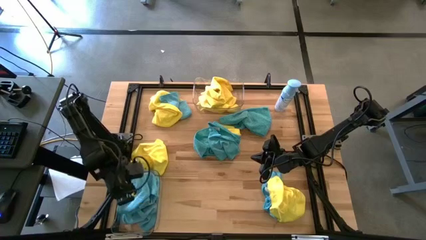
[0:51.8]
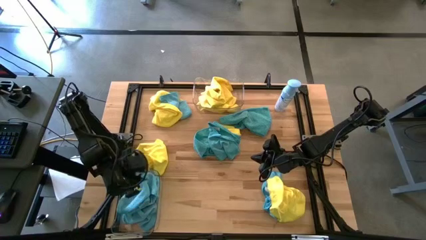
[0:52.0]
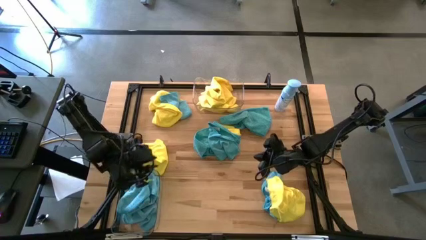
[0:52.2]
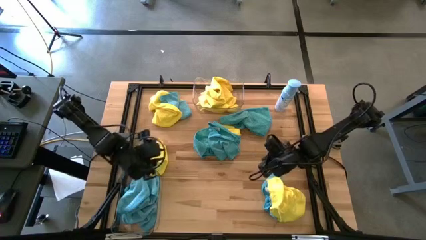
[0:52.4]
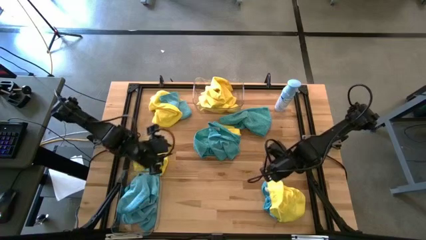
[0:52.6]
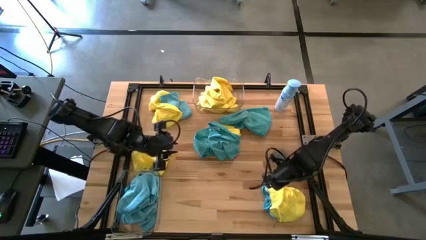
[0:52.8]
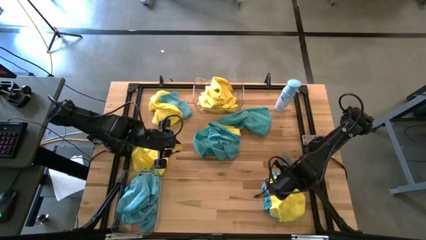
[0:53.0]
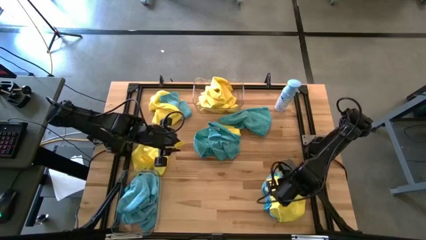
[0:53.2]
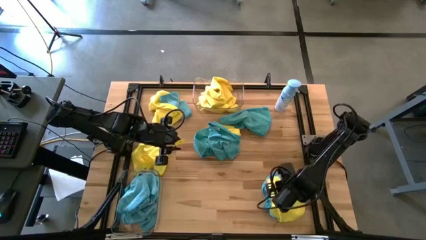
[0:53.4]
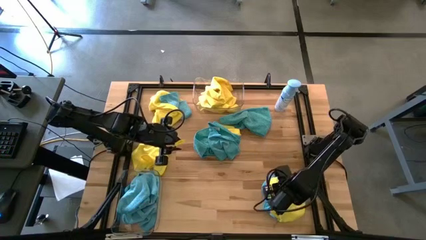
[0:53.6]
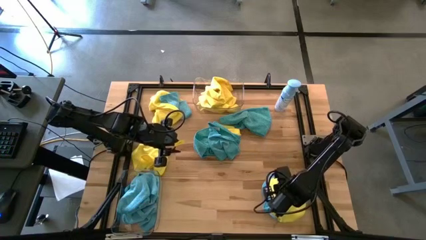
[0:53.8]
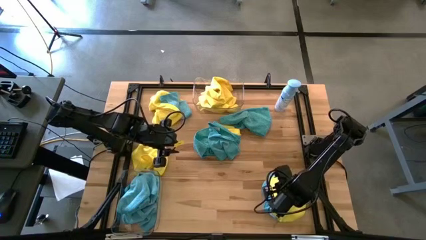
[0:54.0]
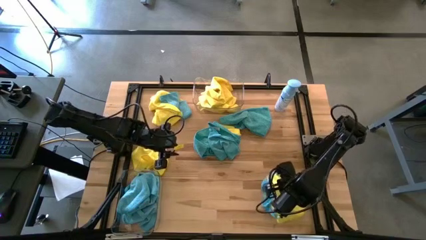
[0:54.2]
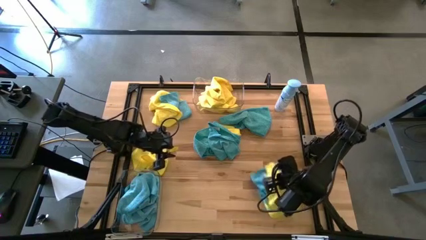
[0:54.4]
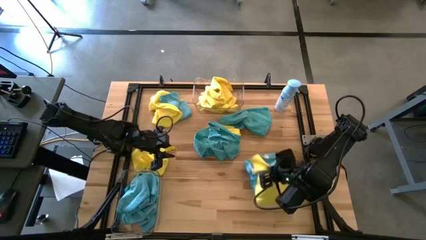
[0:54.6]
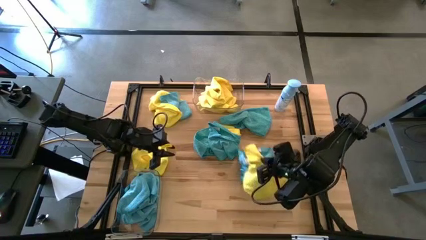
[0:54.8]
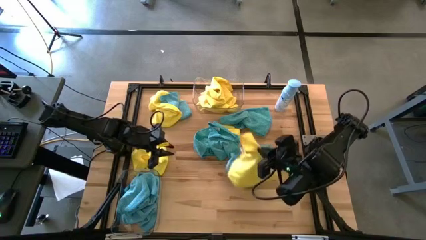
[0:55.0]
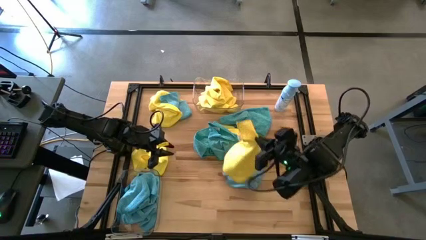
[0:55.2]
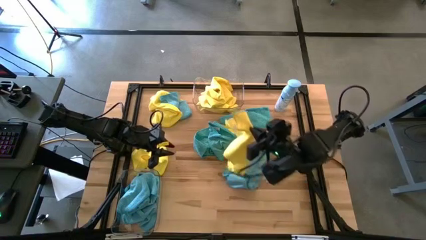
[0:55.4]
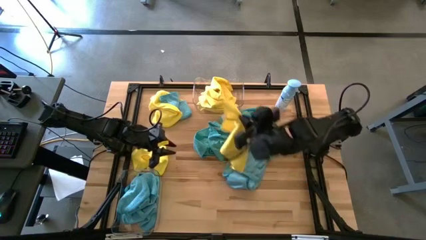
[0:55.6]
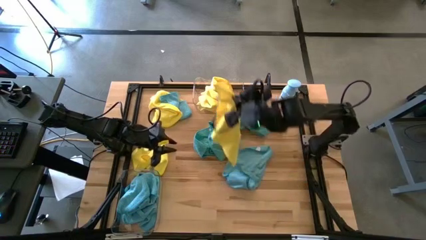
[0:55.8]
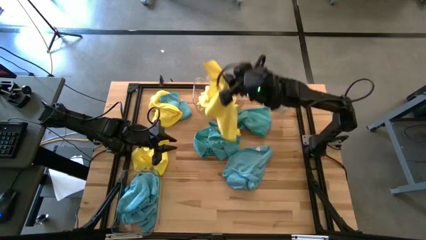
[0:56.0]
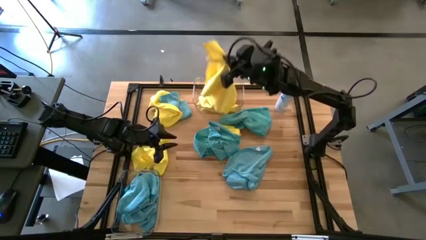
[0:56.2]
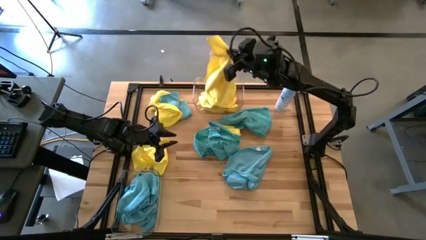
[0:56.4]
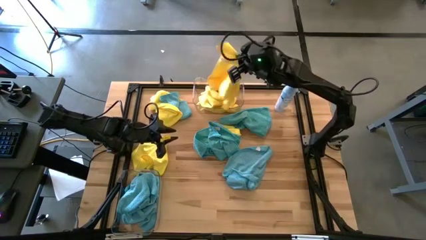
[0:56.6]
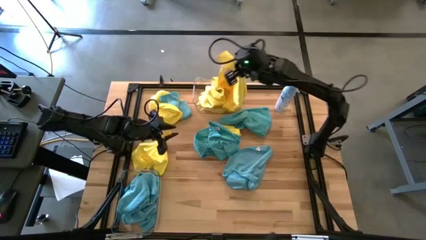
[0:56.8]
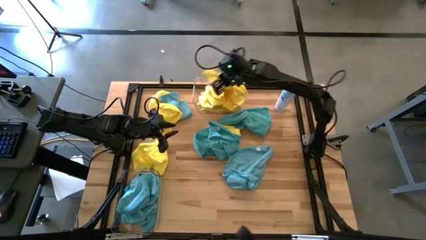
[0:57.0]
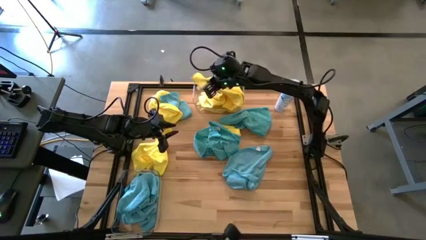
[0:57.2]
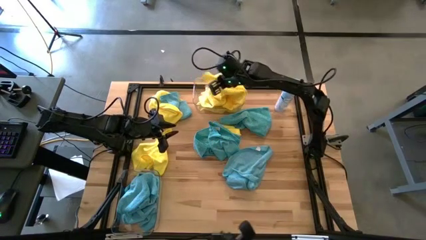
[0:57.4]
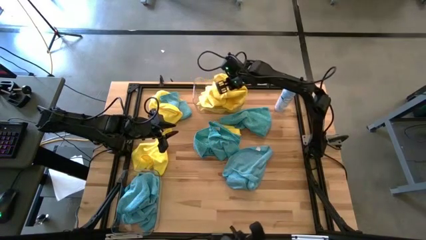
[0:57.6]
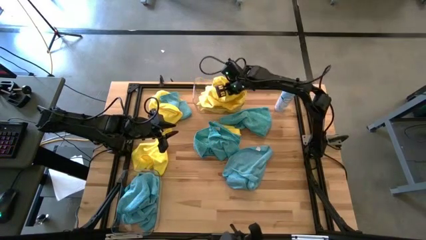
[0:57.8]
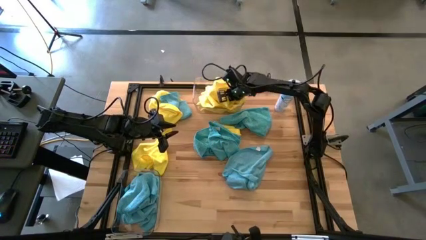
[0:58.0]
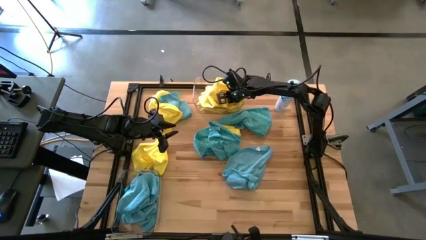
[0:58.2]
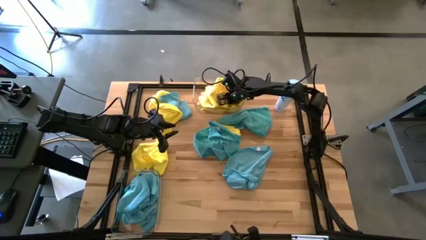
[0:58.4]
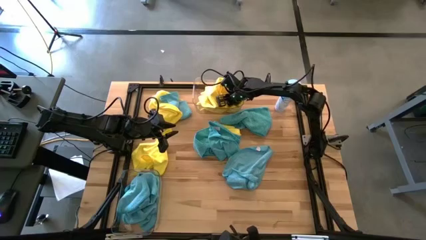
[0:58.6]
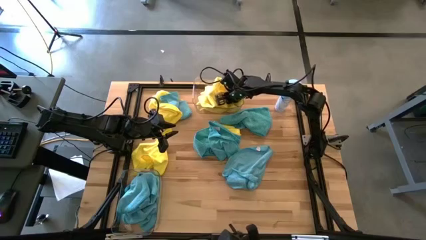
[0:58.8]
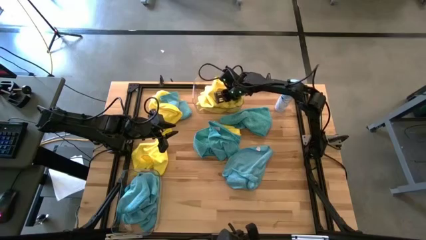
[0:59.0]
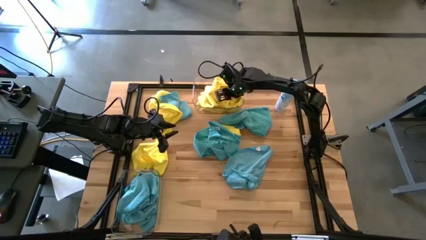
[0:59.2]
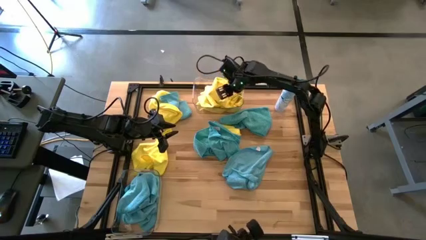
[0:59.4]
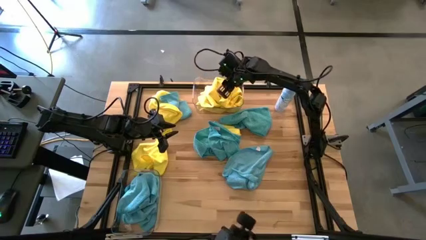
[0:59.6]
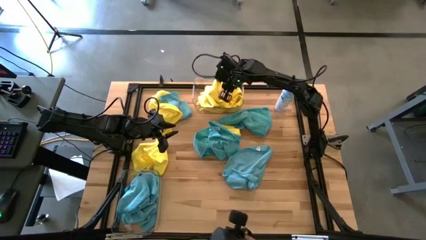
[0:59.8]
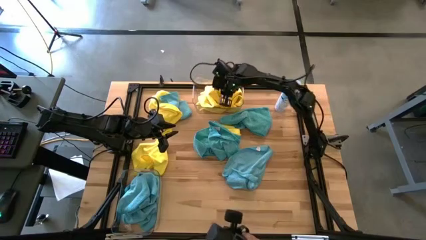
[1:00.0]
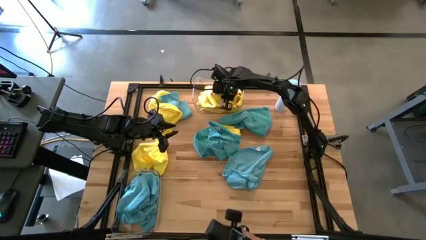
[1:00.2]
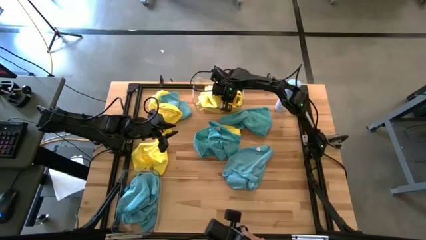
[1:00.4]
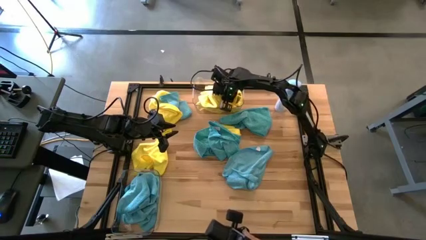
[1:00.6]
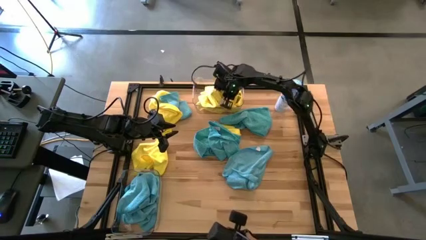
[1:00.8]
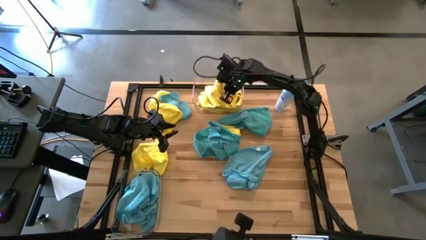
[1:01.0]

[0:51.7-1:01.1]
Task: Sort microfiber towel by color & place in baskets
Put the yellow microfiber towel into the top transparent bin

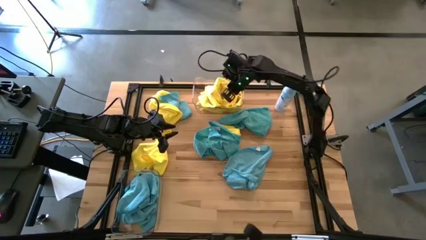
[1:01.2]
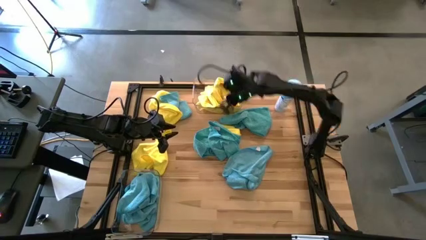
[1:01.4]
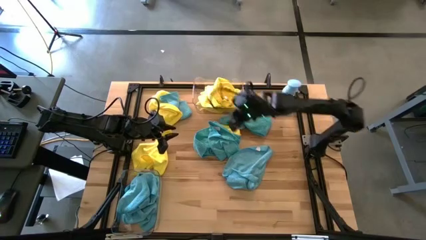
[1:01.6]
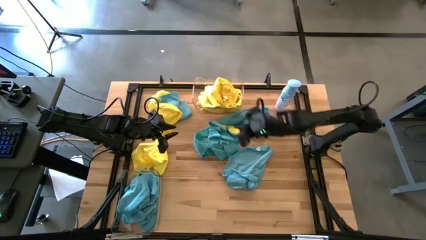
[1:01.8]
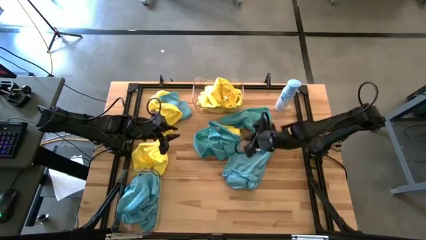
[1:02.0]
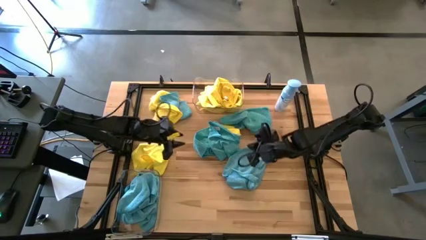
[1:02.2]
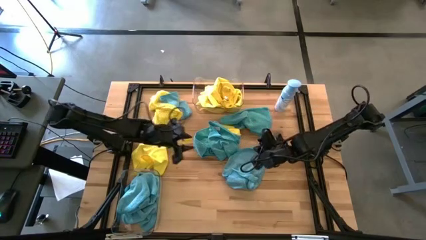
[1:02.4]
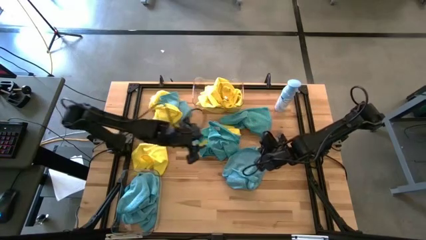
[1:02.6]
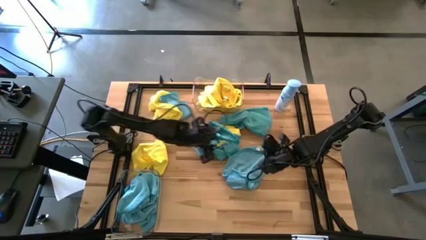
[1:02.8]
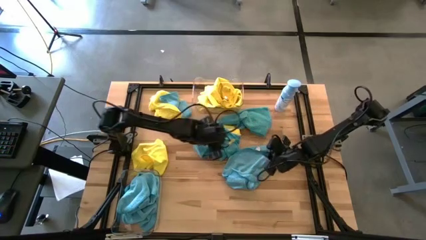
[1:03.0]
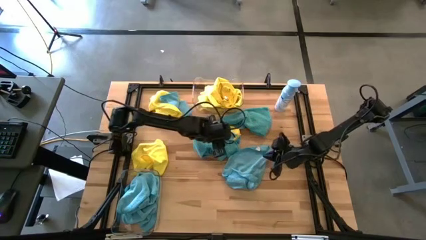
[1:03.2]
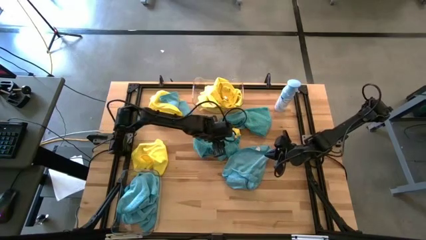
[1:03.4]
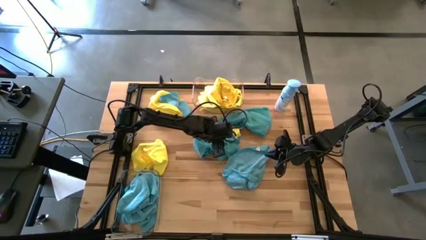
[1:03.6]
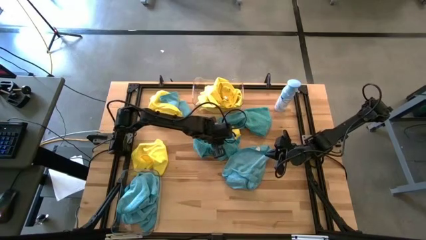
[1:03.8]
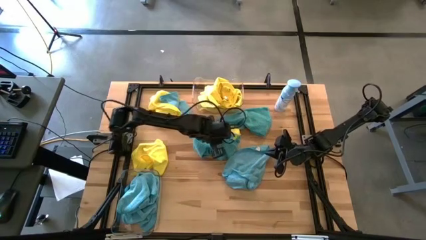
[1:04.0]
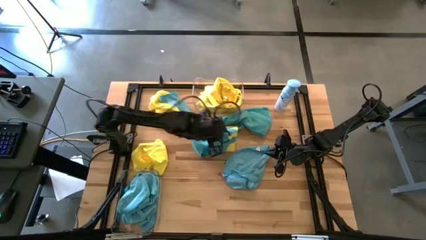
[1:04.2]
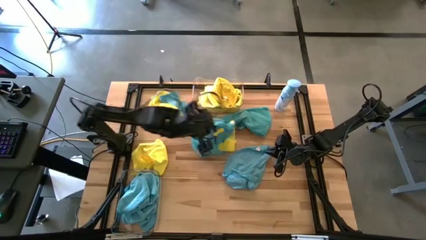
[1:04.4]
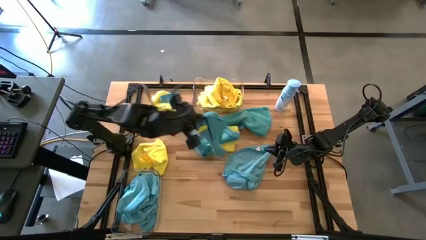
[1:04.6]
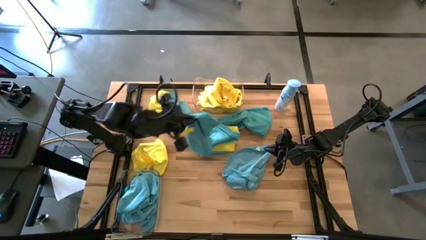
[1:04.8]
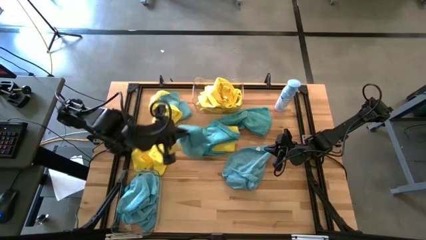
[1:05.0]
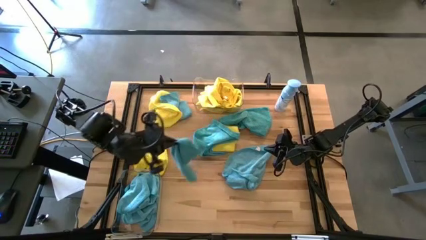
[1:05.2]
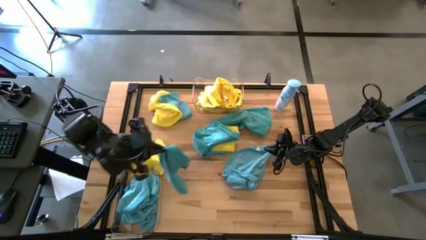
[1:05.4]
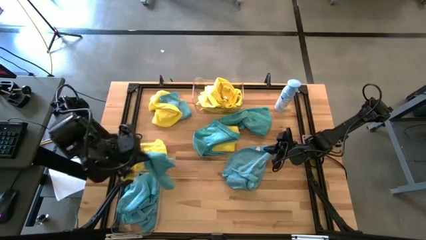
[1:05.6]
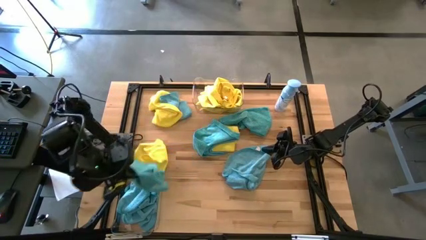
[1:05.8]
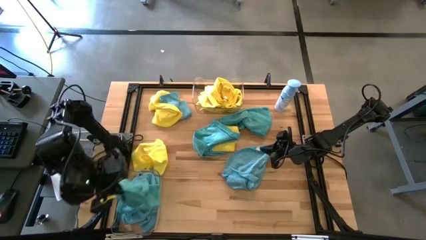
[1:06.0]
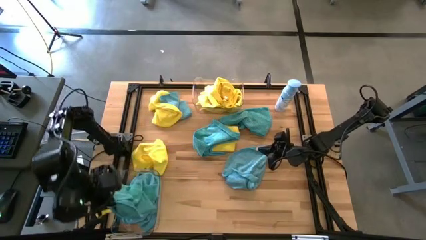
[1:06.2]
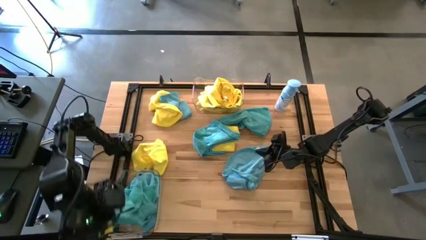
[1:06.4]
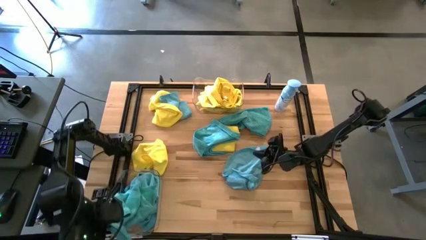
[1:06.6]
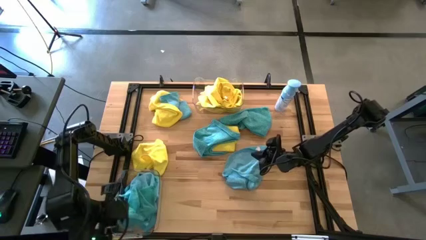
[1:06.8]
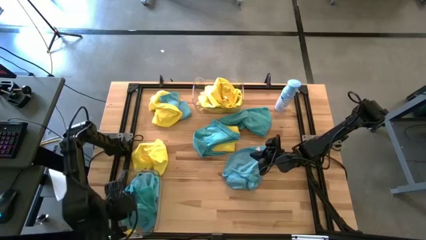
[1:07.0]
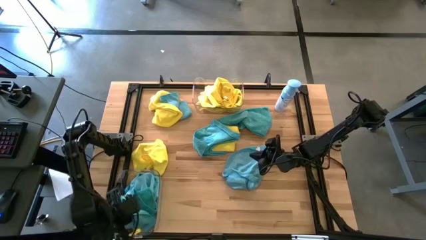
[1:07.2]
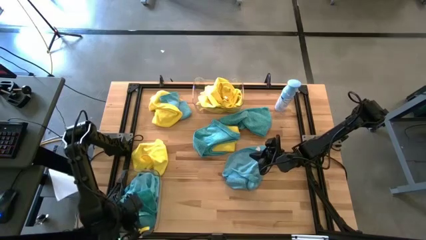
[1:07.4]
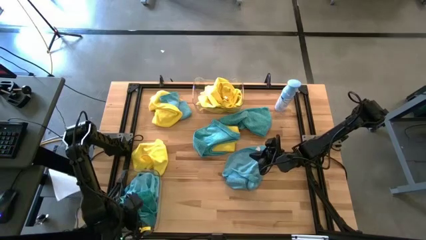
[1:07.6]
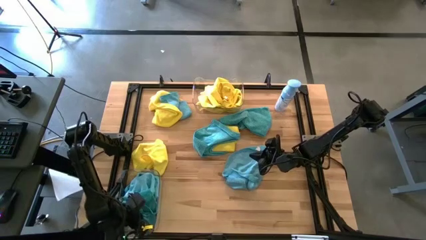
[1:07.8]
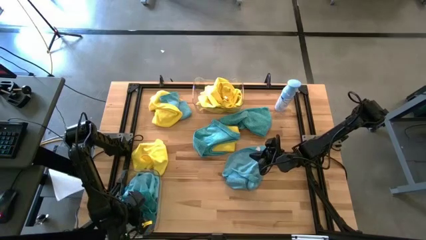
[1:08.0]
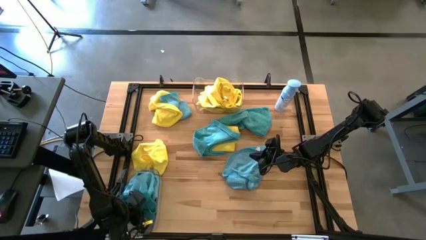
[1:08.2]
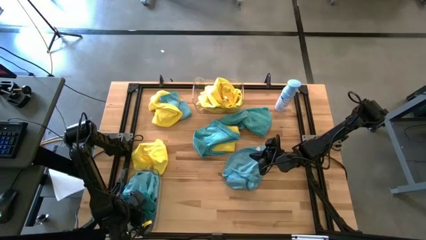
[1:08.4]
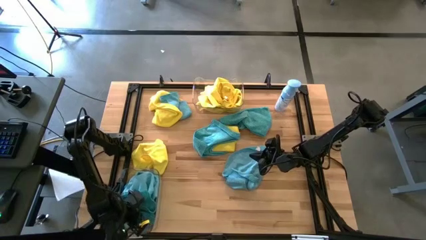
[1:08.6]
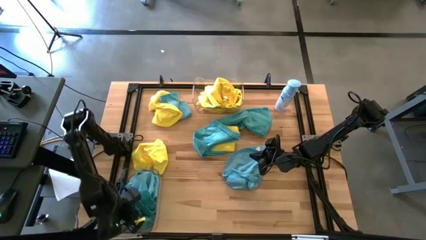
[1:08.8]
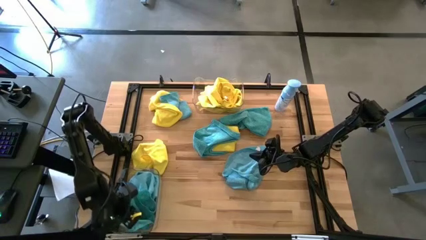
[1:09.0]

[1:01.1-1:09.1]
Put the blue microfiber towel into the bottom transparent bin
